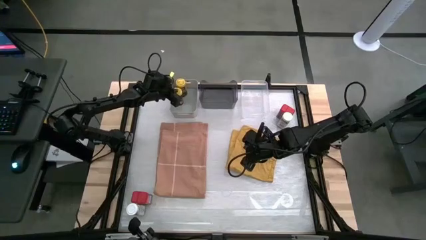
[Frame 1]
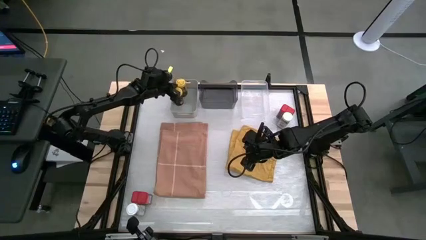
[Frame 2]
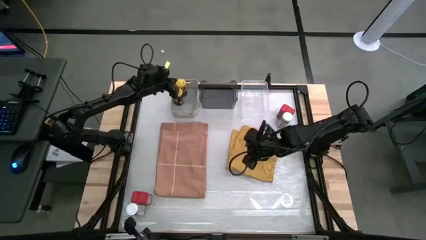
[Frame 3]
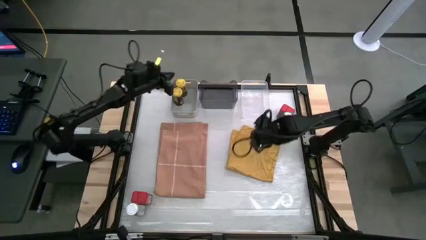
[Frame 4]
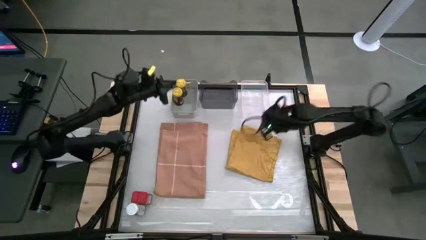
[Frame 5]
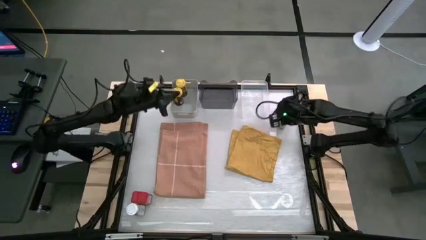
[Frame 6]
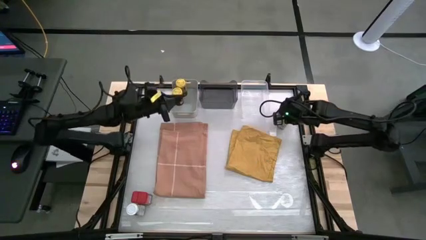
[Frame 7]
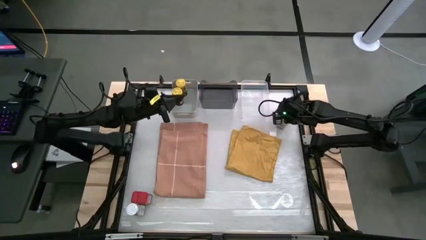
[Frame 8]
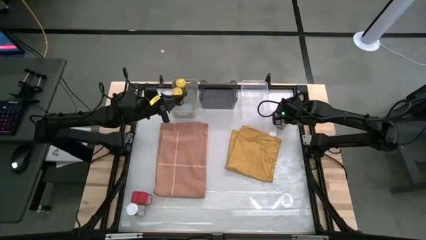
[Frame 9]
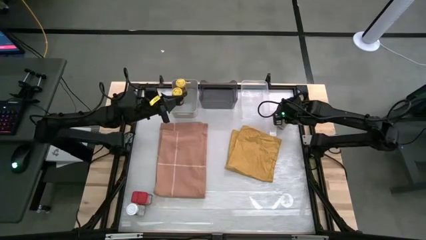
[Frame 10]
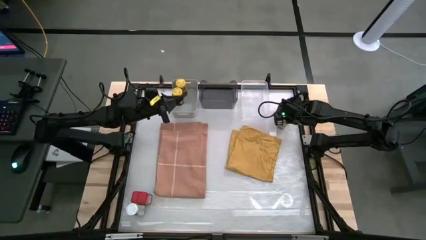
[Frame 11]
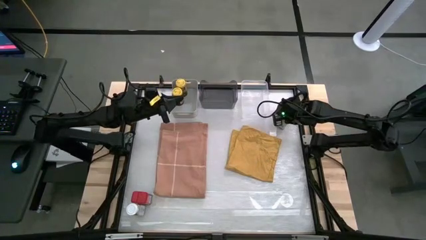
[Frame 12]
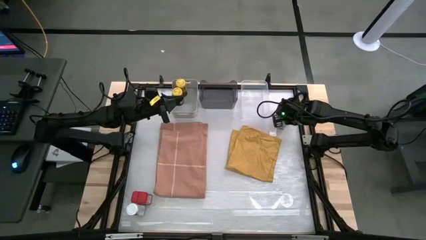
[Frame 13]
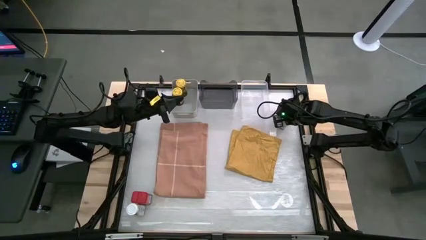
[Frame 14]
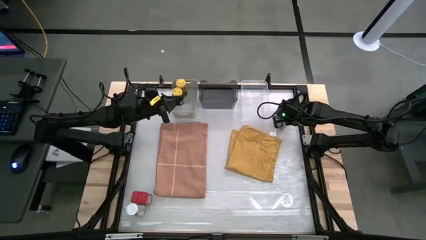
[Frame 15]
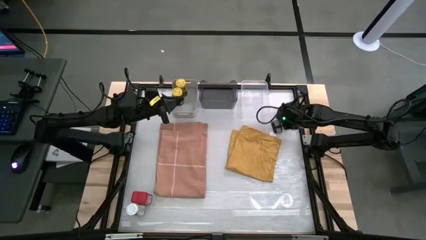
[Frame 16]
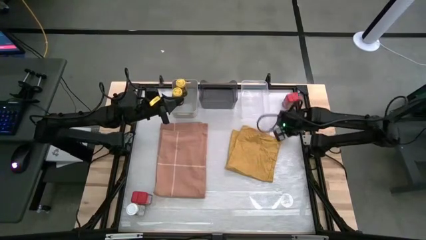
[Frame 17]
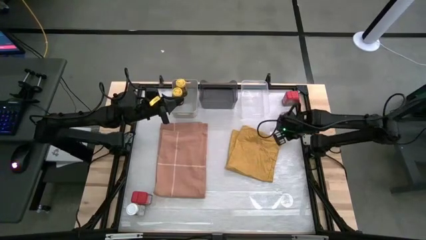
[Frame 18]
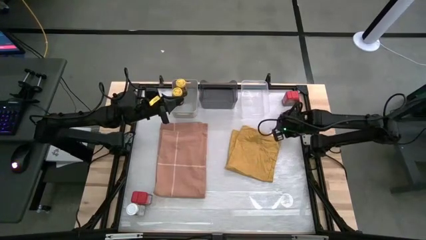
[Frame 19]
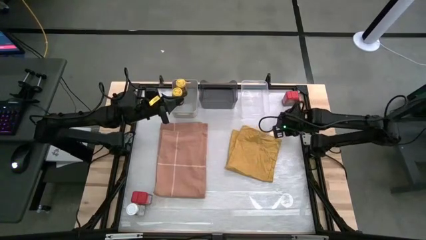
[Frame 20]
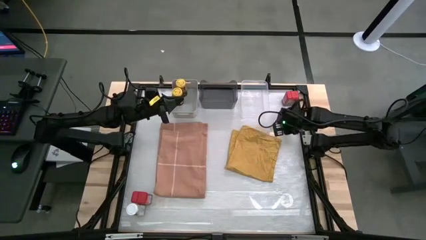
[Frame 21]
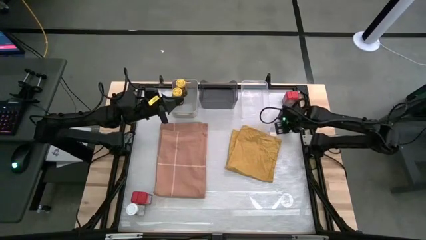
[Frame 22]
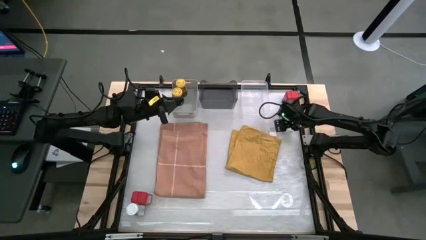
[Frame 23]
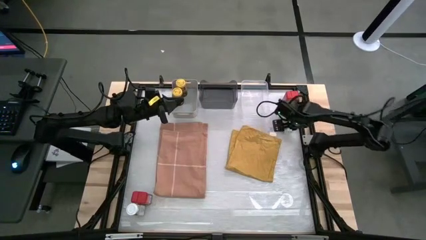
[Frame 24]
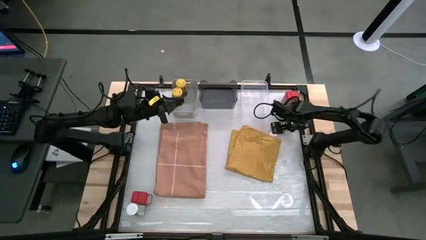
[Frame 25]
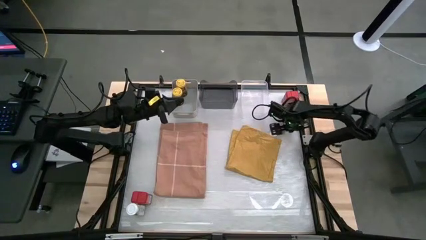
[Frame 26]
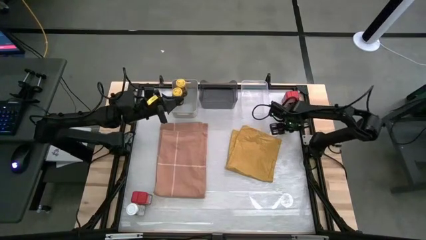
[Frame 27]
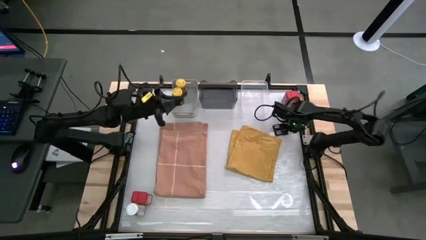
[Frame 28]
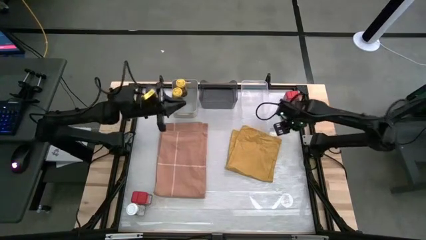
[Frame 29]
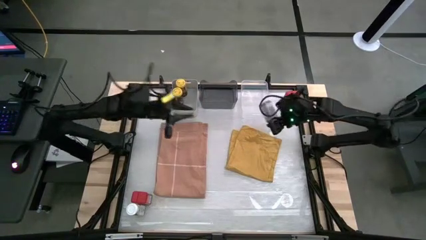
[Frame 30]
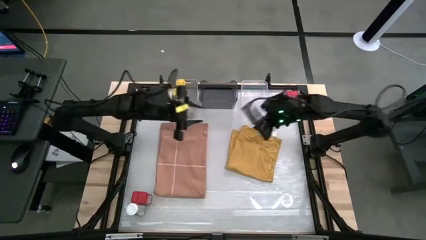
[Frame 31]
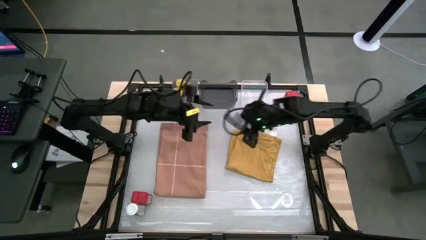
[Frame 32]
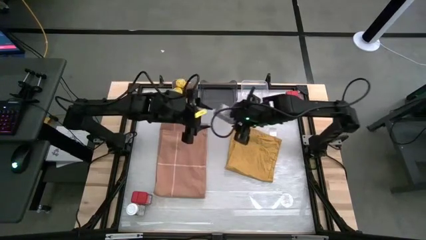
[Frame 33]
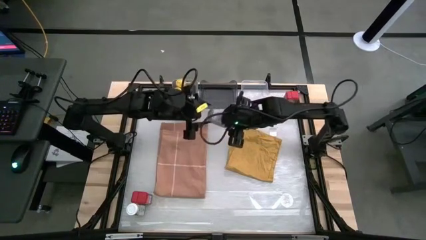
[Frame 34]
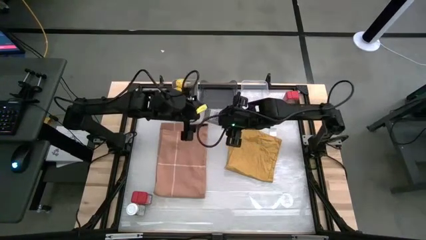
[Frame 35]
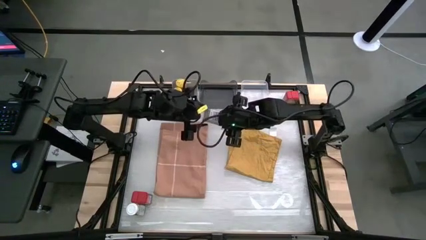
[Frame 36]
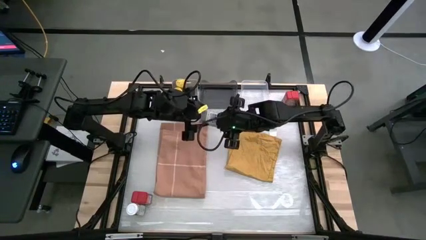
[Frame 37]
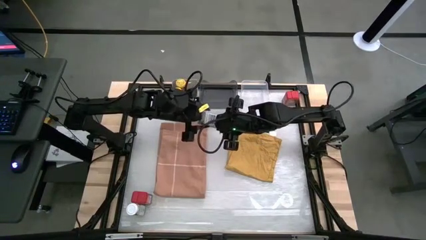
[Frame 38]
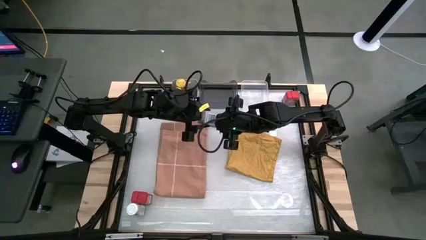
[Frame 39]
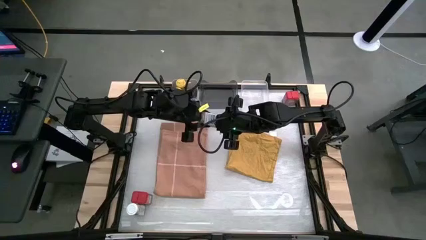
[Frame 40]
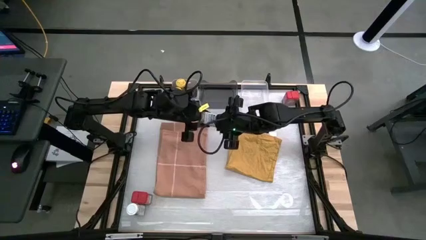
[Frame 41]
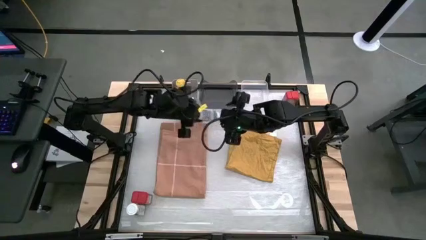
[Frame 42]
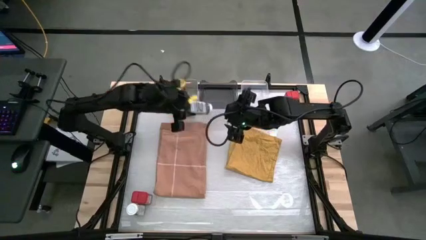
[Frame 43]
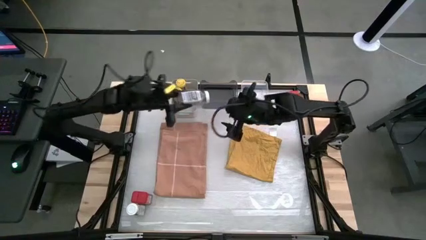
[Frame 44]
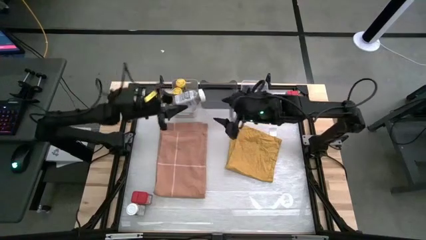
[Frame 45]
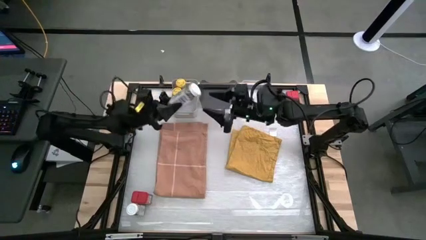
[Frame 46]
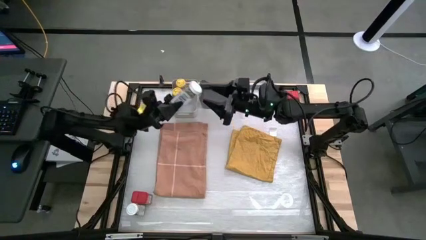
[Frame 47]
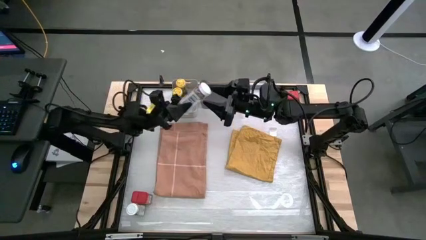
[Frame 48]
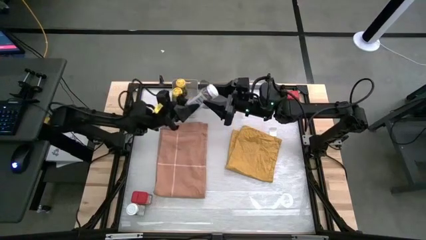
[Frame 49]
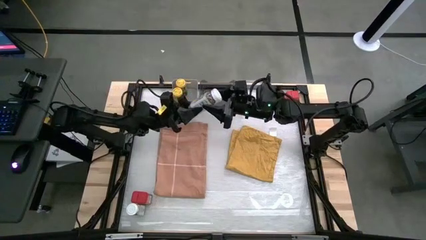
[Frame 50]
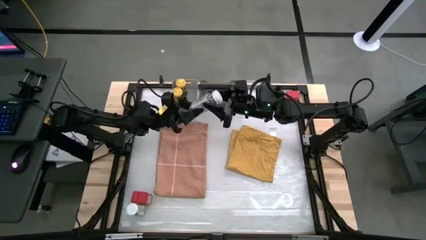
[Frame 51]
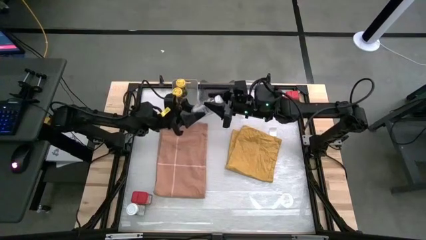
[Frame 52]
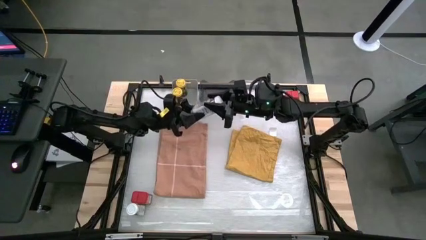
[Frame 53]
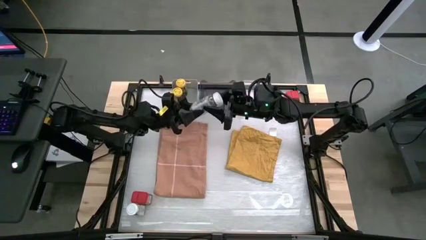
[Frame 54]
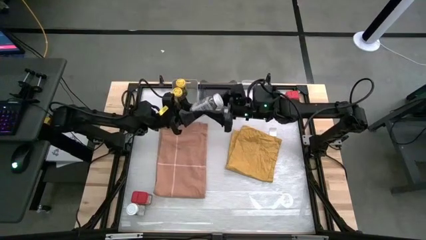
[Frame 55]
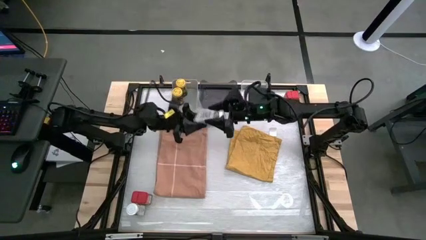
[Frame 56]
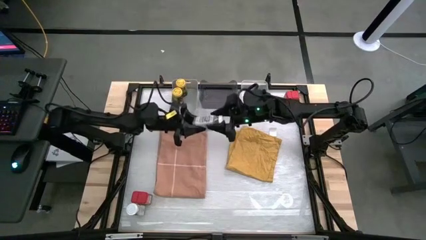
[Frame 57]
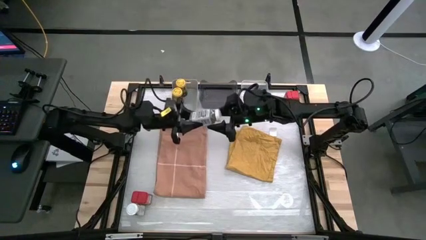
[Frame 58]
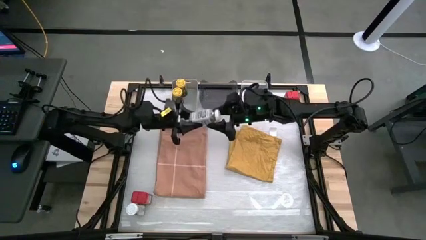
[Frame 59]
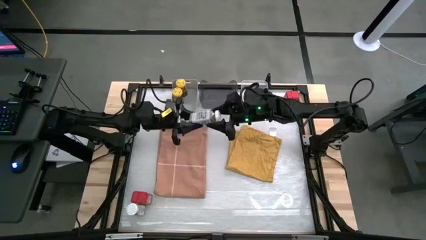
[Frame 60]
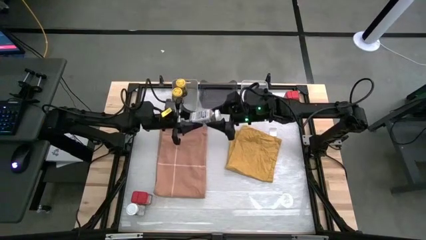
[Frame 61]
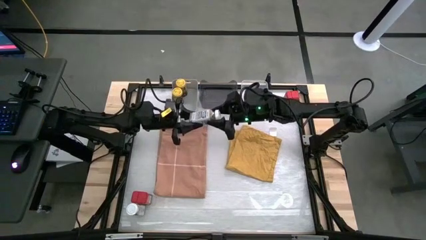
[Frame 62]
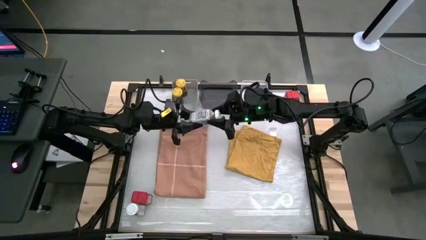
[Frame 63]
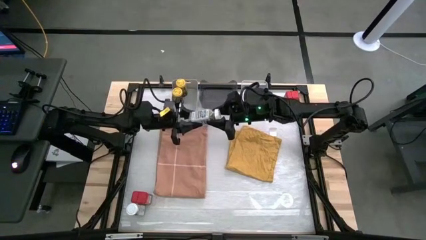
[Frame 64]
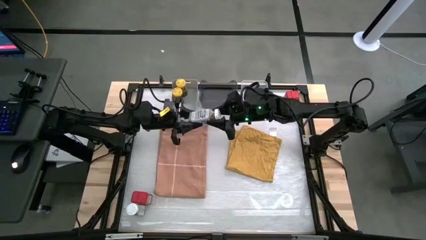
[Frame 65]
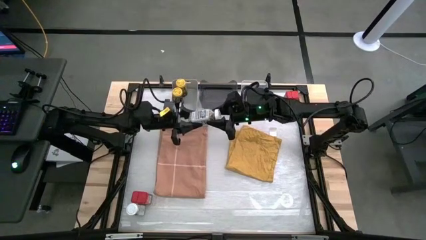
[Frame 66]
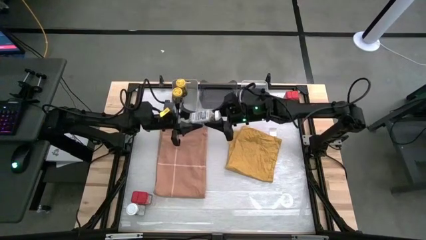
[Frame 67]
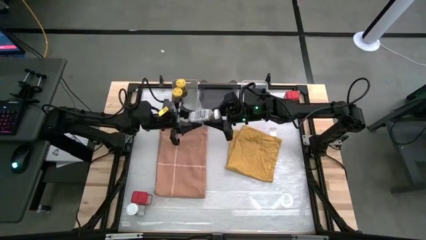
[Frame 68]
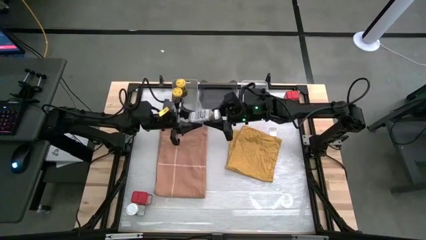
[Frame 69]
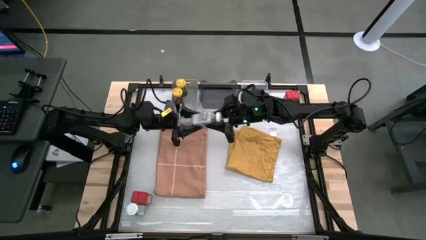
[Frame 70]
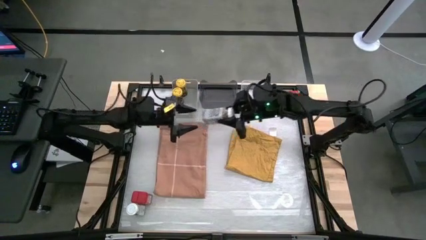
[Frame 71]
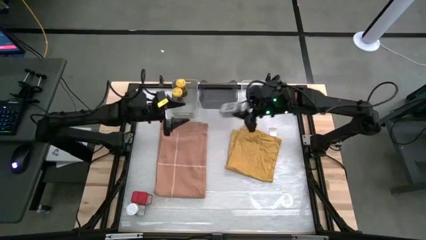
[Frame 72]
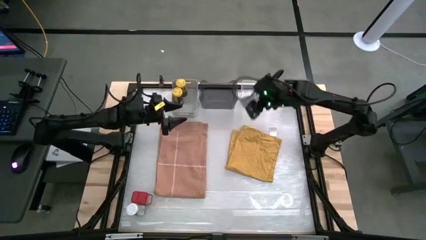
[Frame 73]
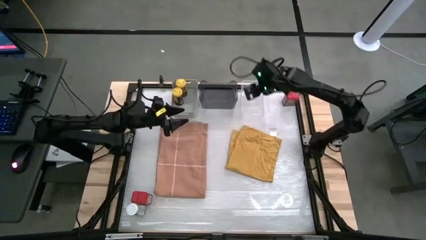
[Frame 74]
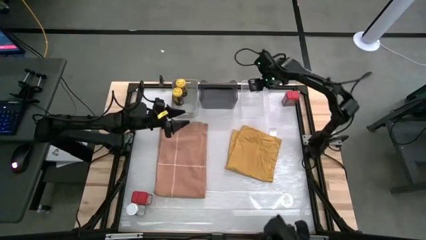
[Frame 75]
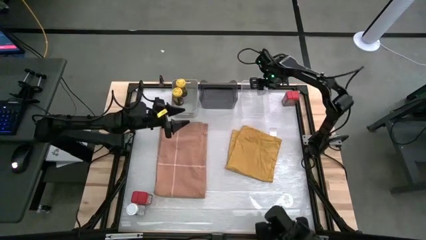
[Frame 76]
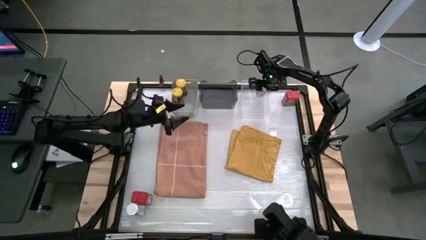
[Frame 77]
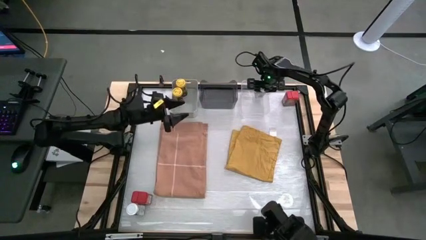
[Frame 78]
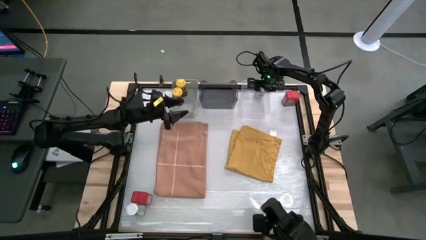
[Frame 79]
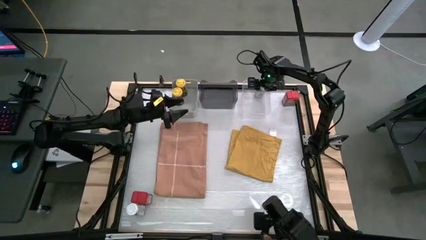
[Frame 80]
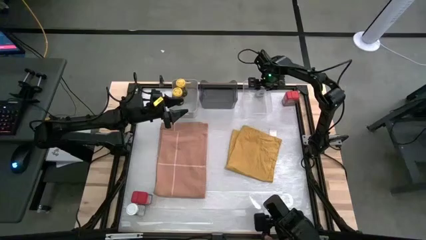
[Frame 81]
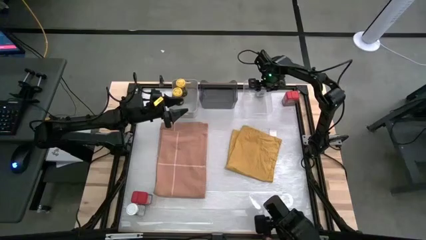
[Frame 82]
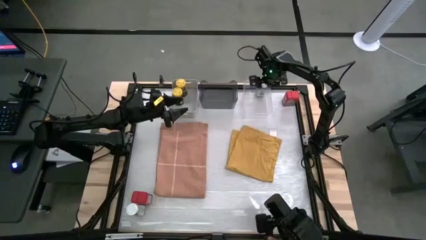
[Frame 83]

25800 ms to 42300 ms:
Task: Sort spices by type
Put the top white seasoning bottle into the transparent bin
